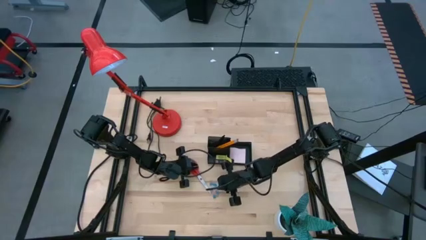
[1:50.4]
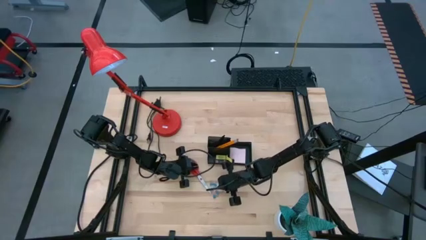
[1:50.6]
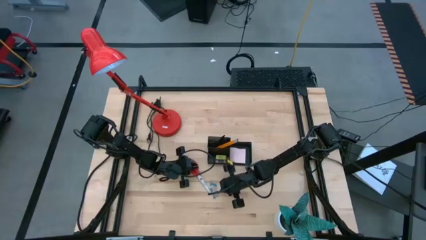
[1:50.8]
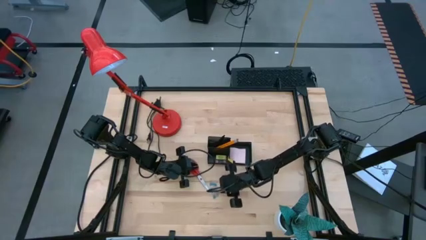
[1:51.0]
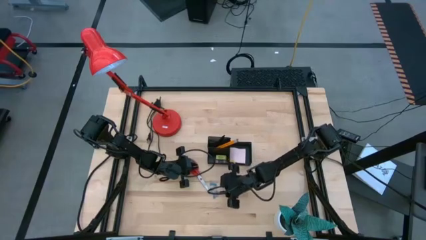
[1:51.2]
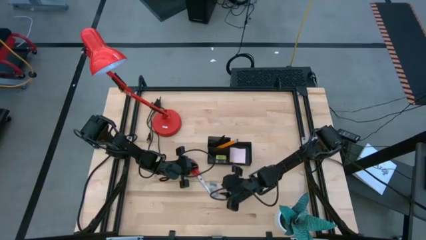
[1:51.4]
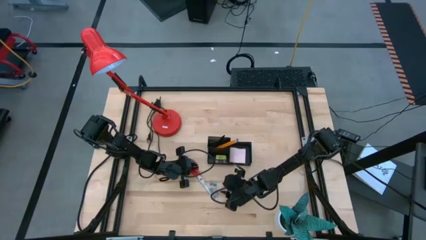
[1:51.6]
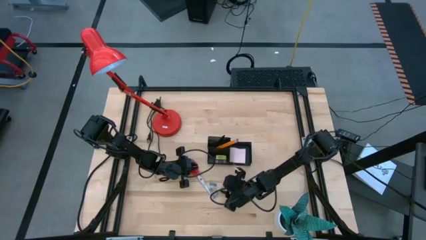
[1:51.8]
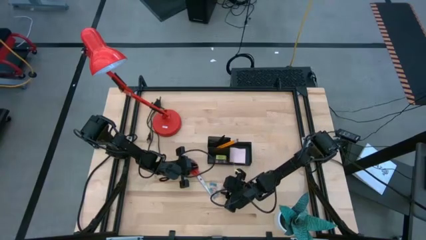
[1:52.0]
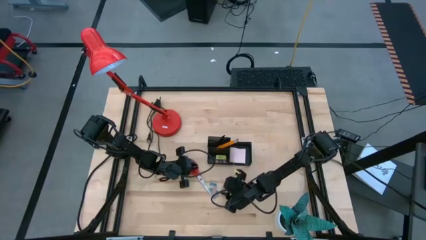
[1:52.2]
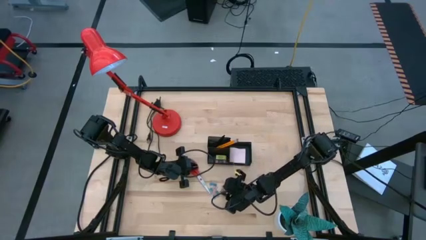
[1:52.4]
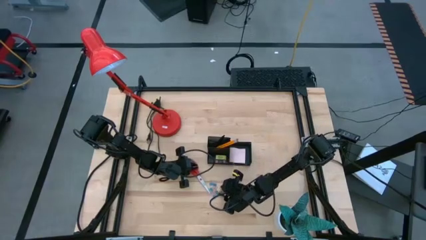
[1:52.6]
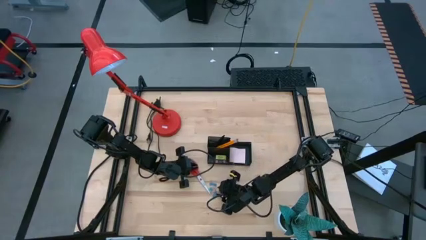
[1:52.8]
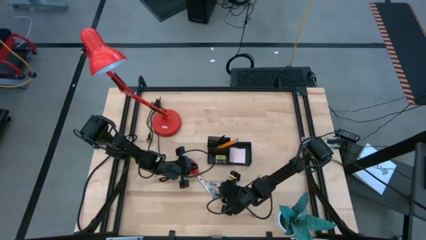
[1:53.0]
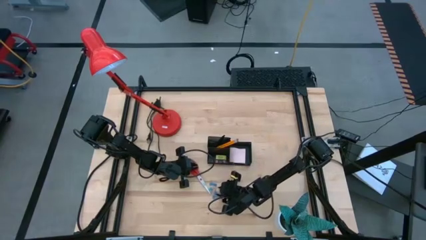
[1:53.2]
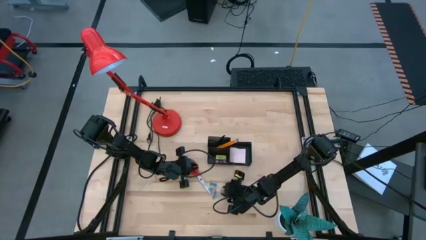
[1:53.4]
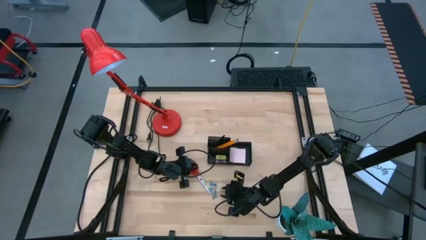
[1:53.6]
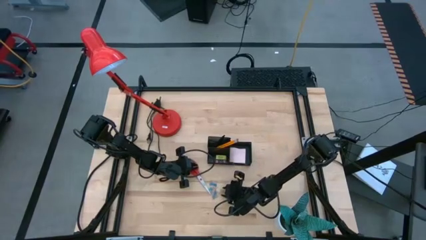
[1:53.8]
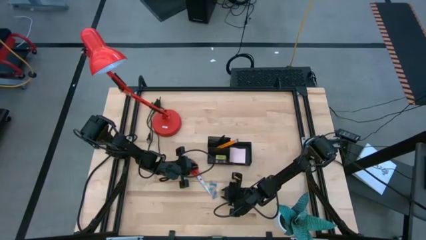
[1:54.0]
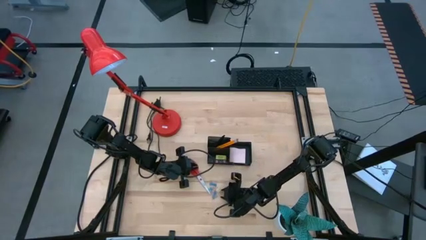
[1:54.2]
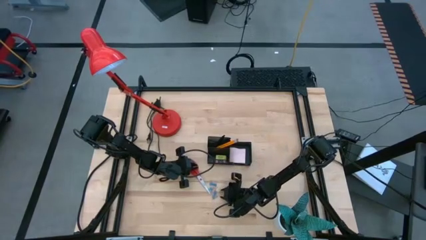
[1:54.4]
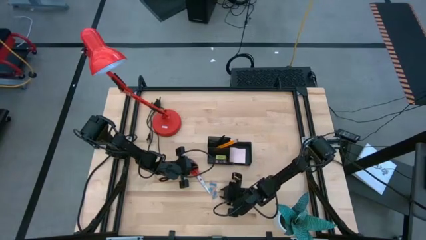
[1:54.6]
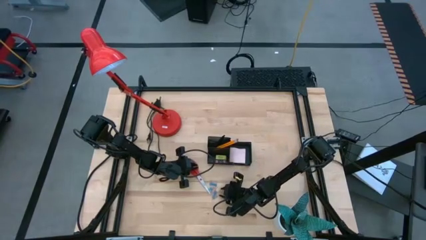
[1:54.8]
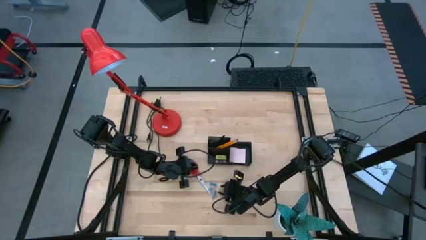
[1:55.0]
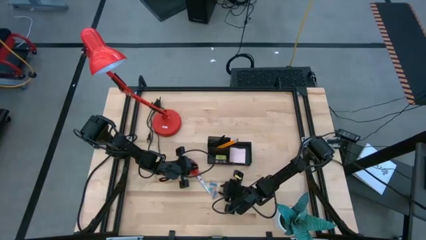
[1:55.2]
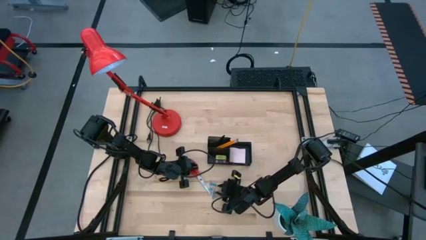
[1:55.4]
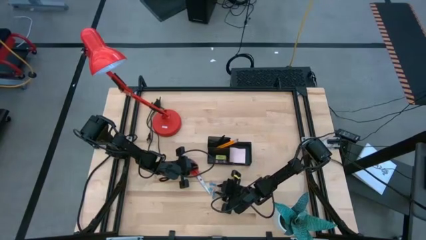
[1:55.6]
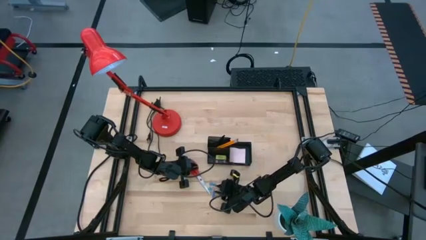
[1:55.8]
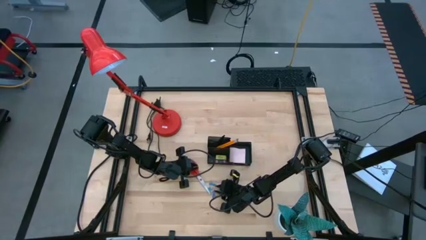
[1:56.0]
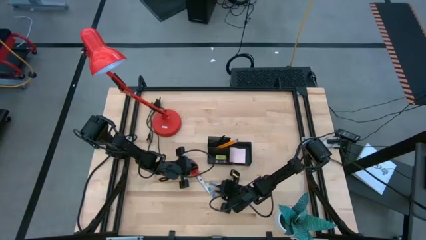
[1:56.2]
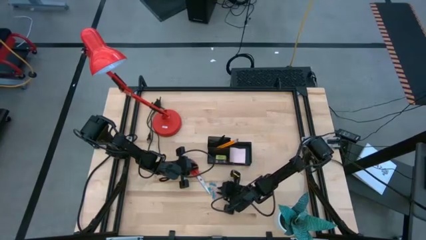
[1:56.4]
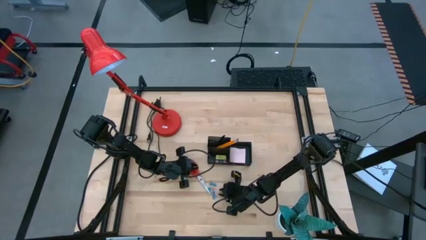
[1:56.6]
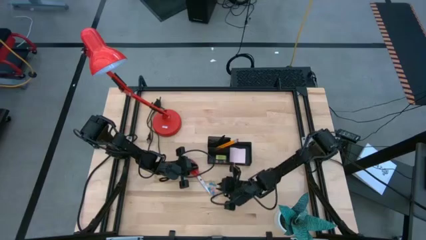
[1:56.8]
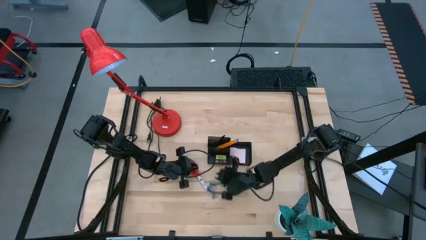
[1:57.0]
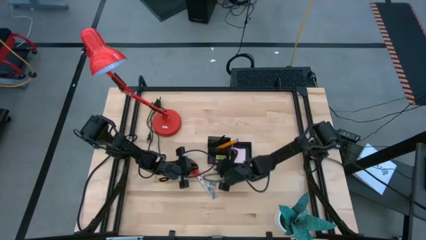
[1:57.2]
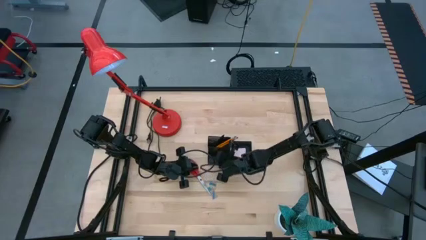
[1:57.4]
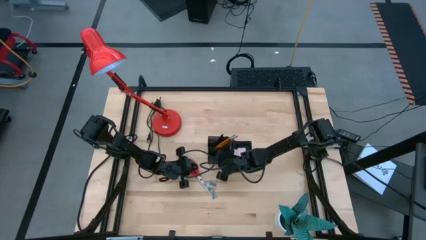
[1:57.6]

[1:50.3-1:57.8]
Task: Pick and place office supplies into organizer
Put the green binder clip into the black desk organizer

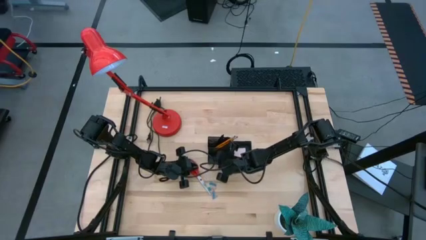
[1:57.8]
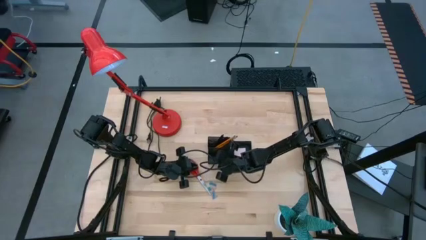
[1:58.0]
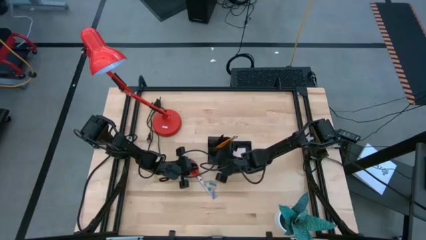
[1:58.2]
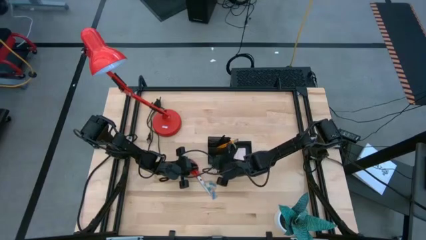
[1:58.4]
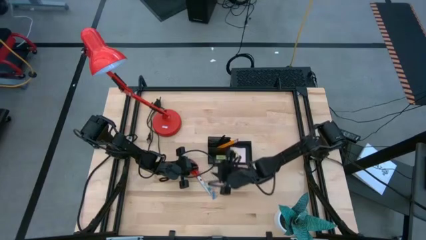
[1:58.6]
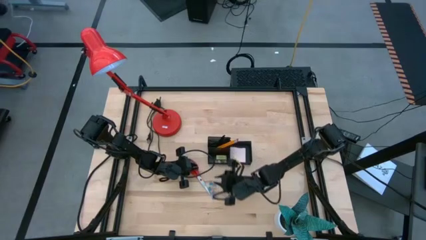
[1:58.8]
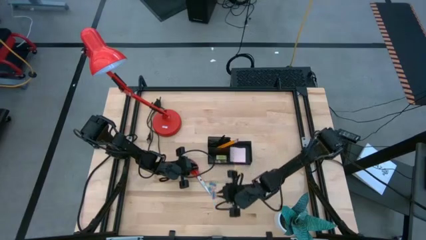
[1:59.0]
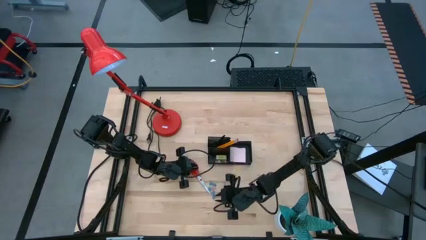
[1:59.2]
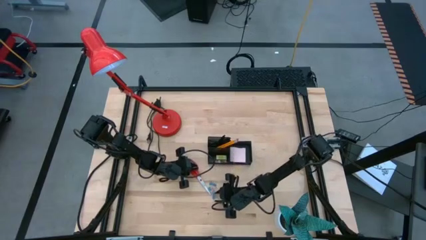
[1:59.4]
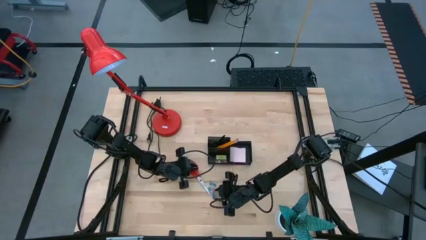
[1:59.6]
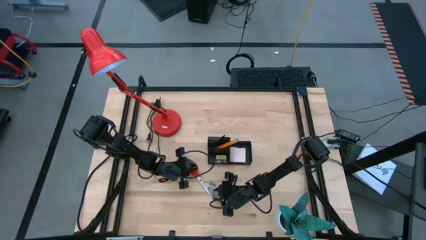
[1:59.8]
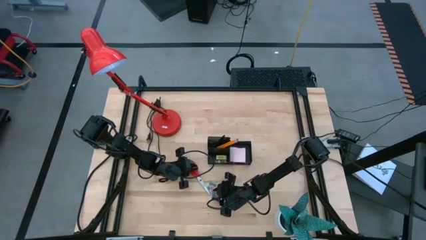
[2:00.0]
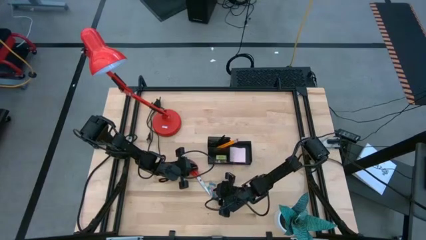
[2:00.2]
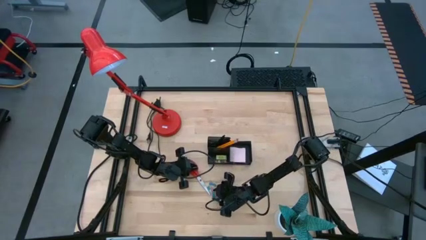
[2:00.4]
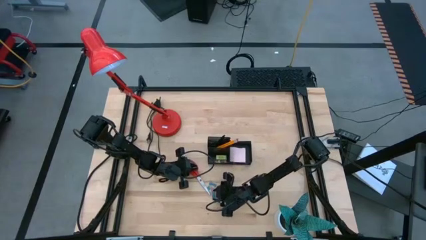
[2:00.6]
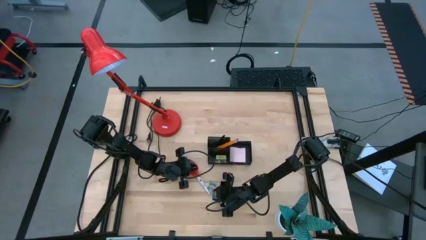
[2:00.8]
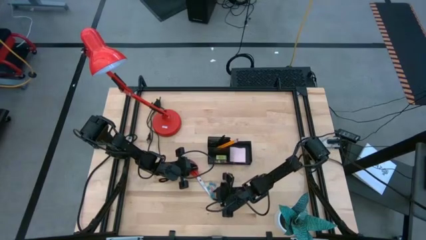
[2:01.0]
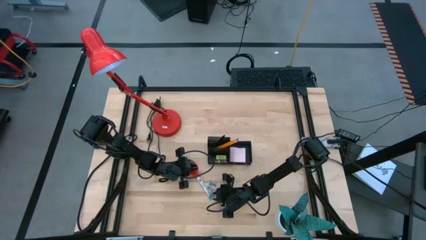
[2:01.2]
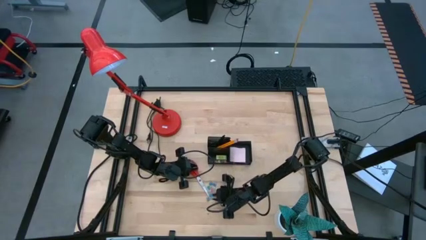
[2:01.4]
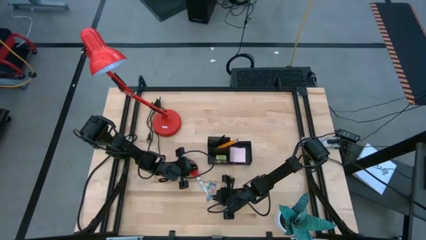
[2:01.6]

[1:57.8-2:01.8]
Put the blue binder clip into the black desk organizer

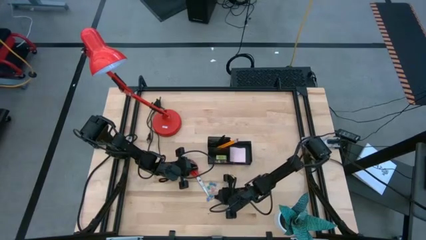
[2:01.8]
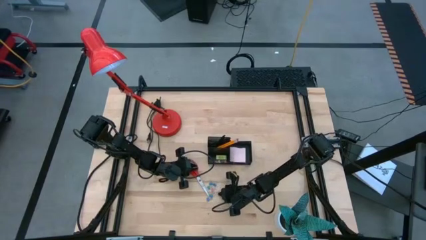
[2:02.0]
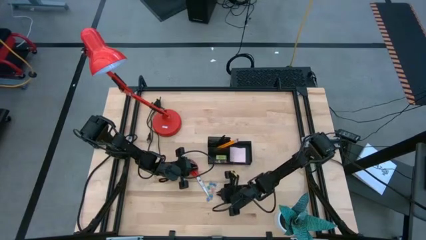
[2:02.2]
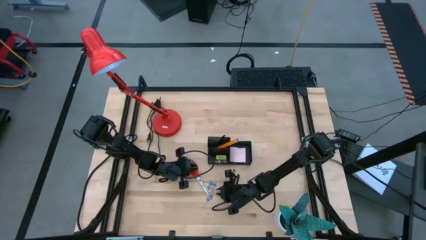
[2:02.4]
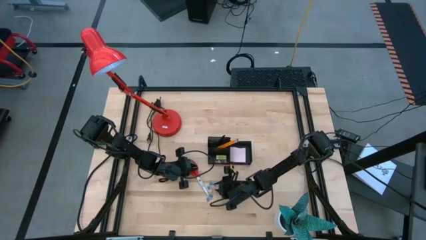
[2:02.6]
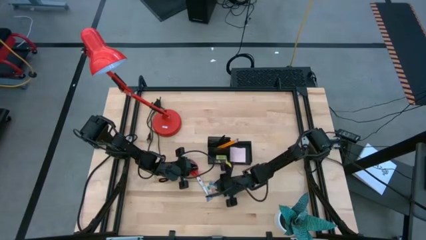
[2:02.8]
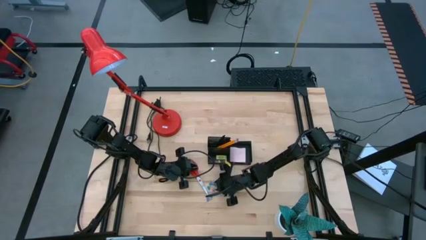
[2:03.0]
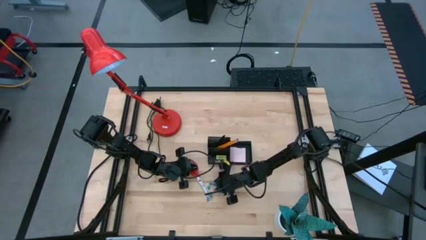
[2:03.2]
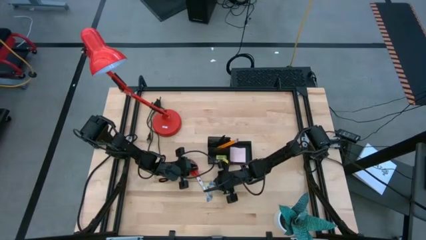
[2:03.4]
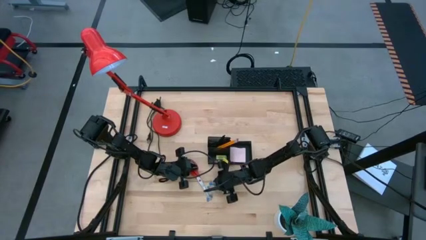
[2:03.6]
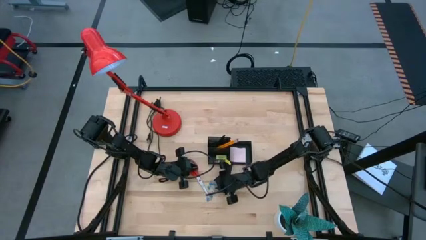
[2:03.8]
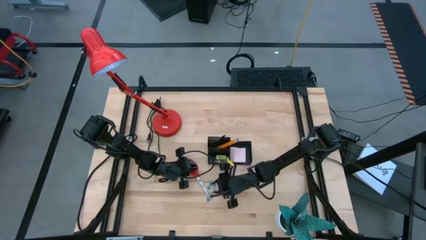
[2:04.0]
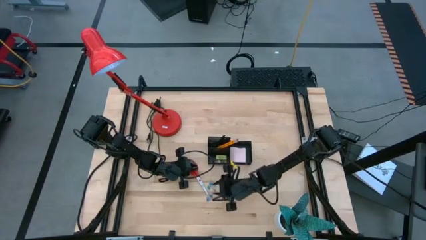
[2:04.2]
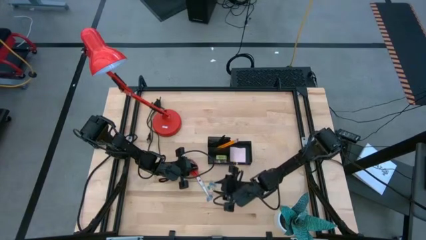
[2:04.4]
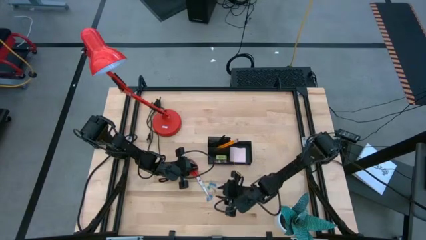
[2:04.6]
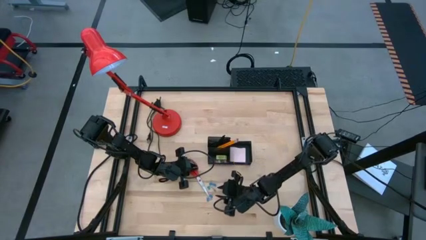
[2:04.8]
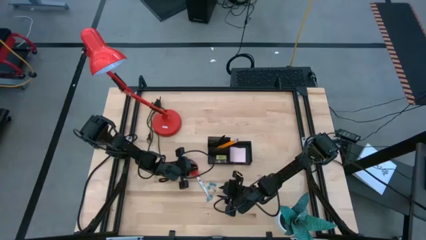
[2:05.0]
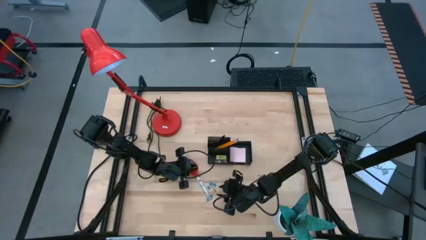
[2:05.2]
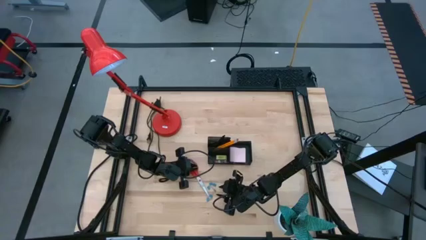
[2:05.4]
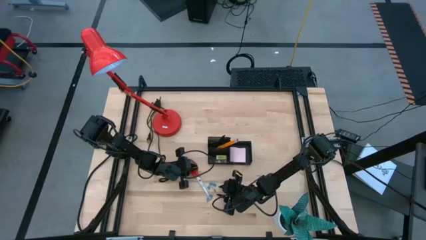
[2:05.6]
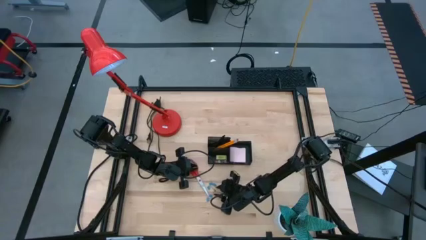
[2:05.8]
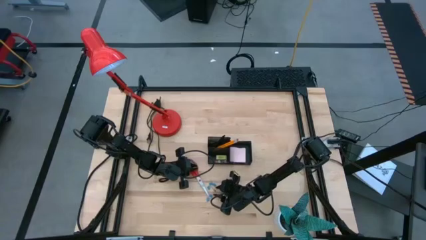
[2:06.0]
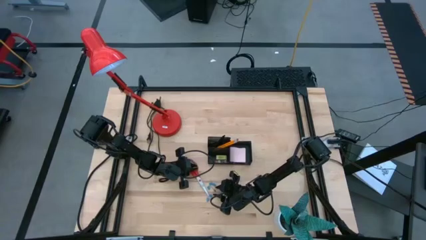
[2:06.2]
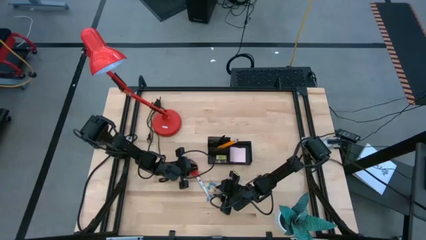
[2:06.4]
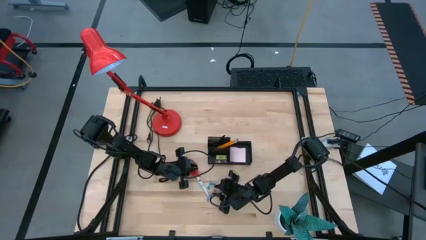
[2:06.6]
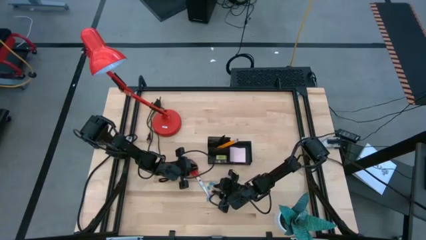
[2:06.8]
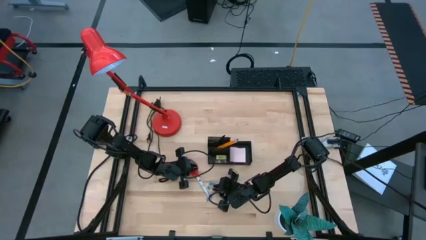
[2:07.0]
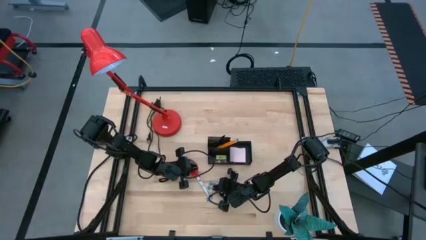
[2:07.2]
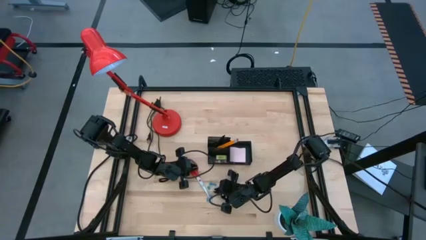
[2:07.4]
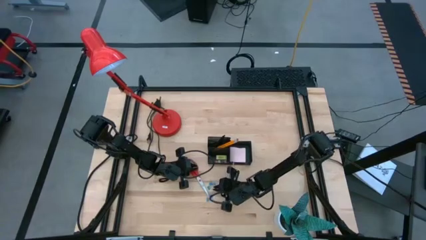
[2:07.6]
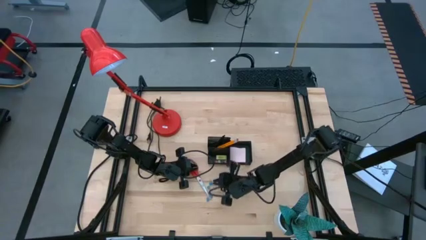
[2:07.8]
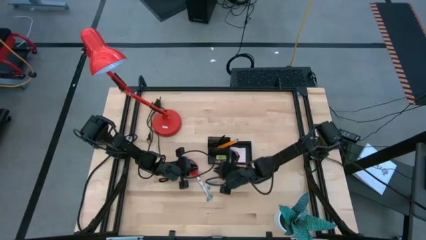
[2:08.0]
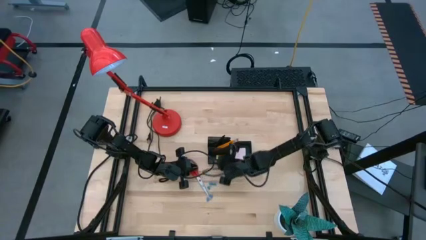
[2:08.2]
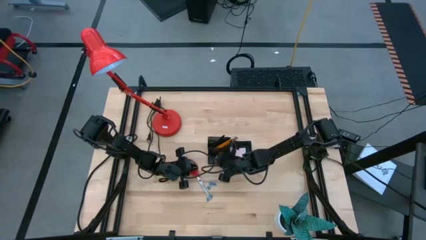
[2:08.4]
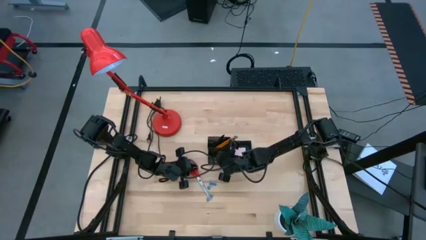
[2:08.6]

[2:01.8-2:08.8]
Put the pink binder clip into the black desk organizer
